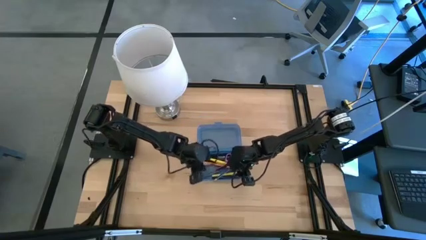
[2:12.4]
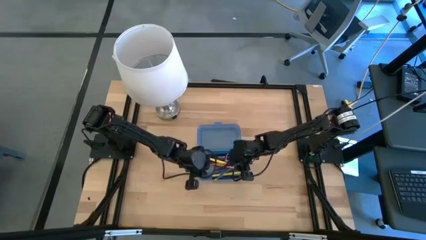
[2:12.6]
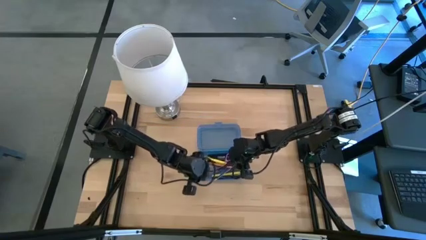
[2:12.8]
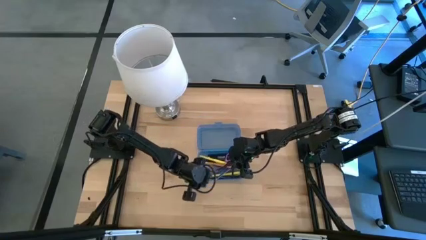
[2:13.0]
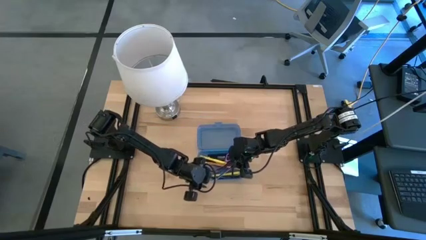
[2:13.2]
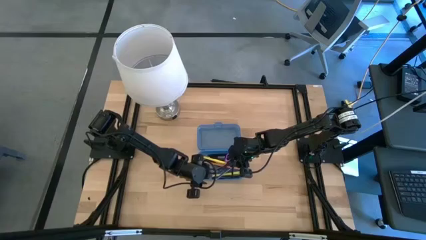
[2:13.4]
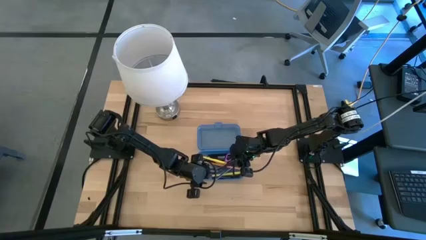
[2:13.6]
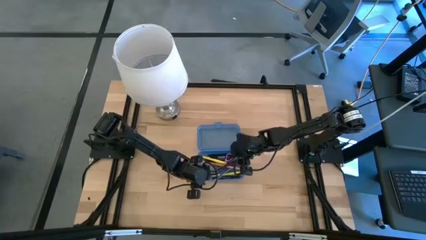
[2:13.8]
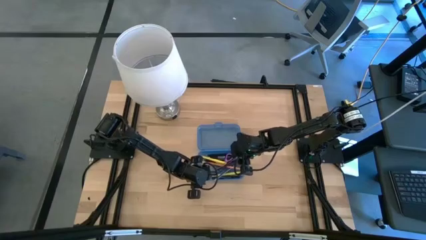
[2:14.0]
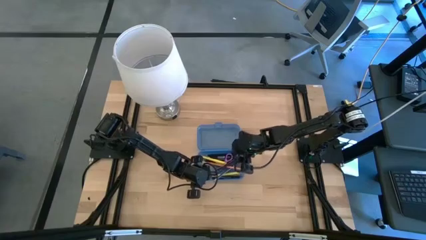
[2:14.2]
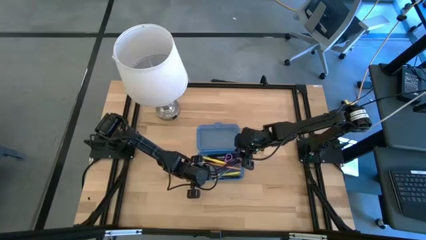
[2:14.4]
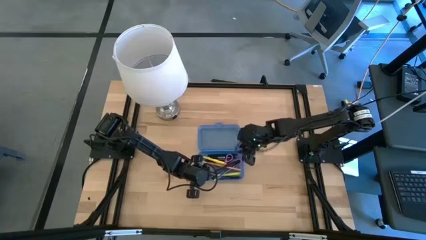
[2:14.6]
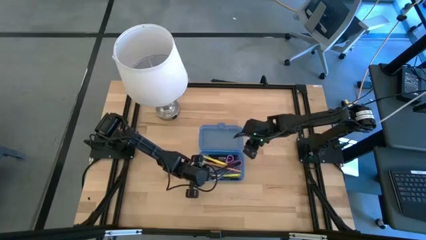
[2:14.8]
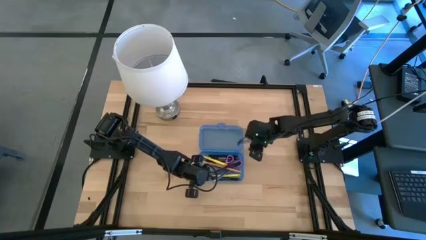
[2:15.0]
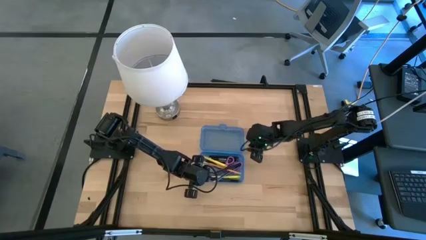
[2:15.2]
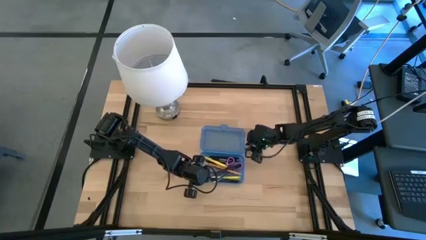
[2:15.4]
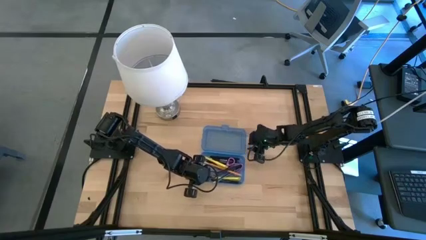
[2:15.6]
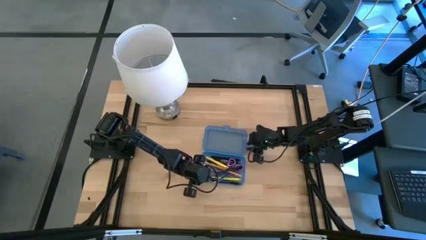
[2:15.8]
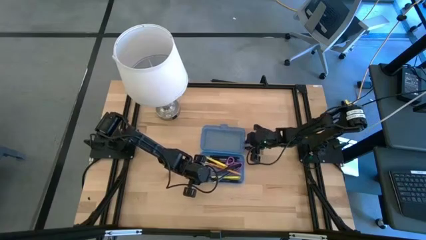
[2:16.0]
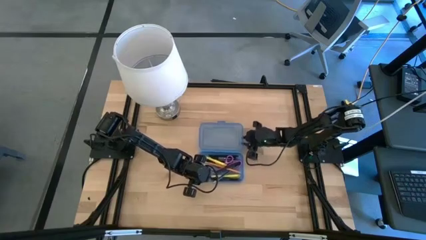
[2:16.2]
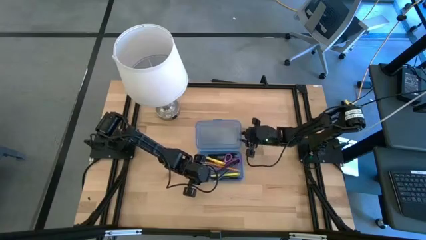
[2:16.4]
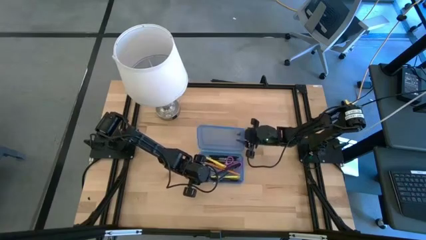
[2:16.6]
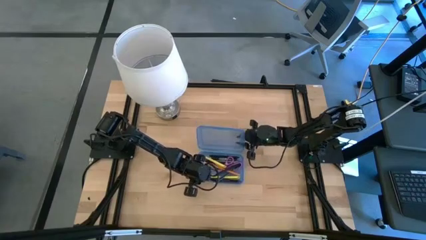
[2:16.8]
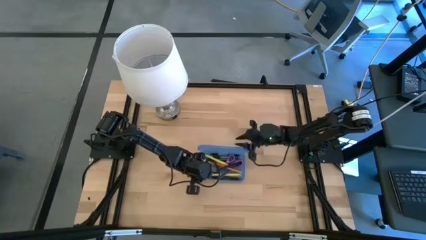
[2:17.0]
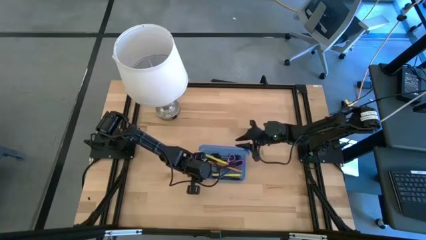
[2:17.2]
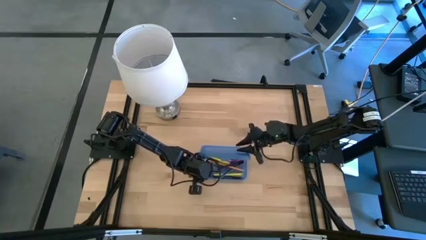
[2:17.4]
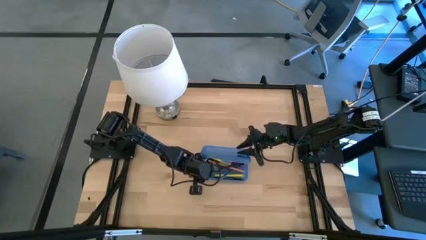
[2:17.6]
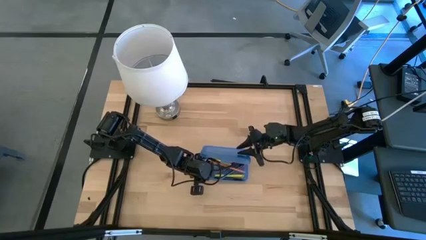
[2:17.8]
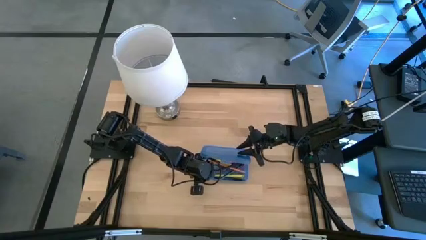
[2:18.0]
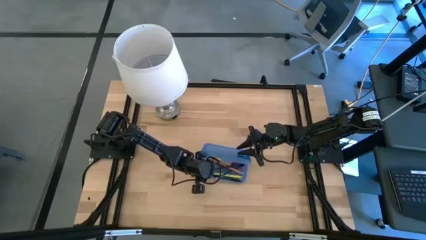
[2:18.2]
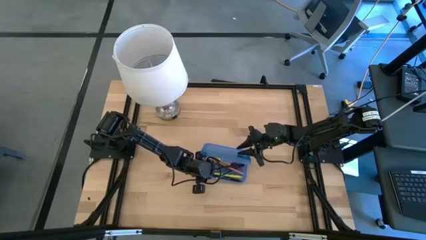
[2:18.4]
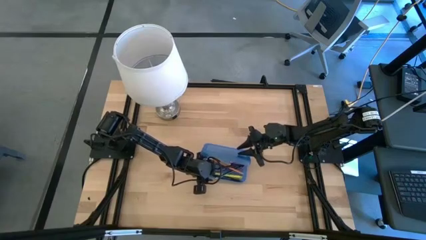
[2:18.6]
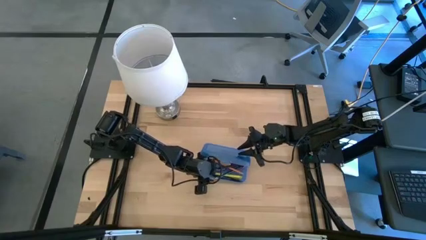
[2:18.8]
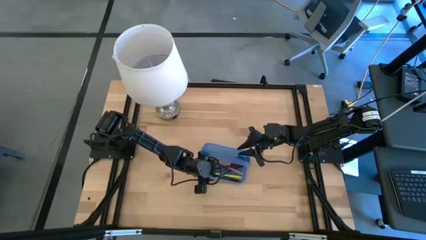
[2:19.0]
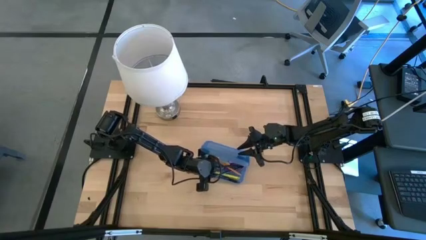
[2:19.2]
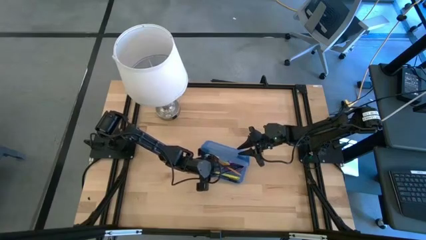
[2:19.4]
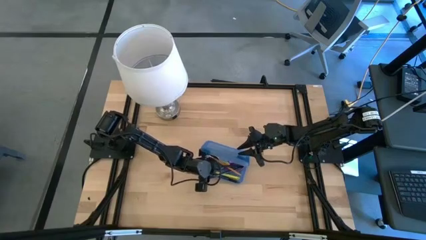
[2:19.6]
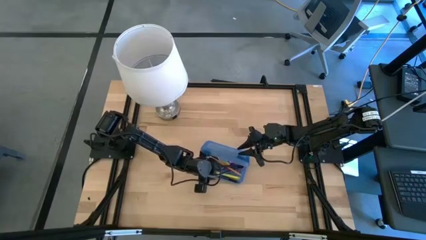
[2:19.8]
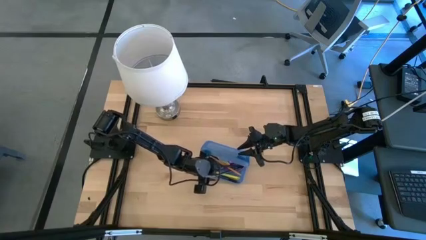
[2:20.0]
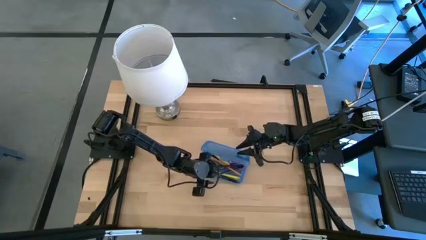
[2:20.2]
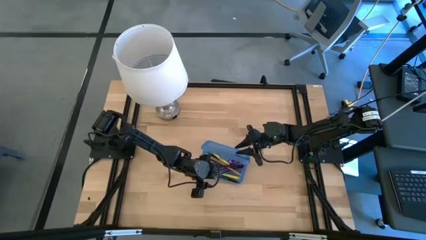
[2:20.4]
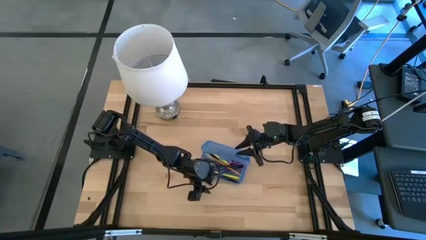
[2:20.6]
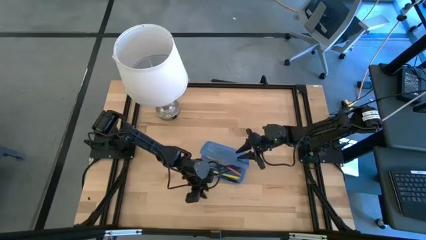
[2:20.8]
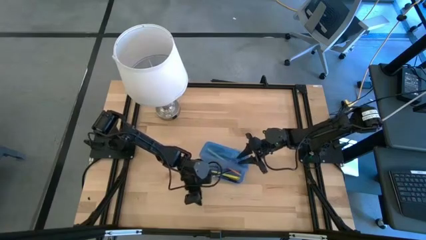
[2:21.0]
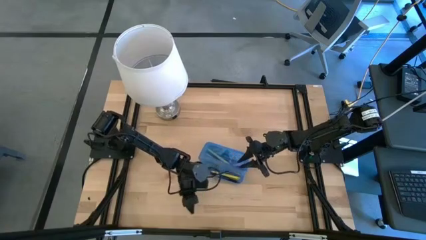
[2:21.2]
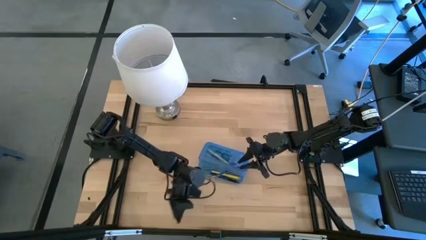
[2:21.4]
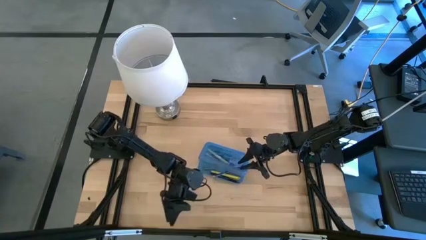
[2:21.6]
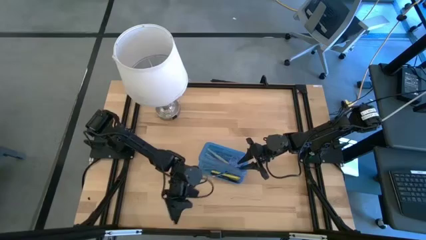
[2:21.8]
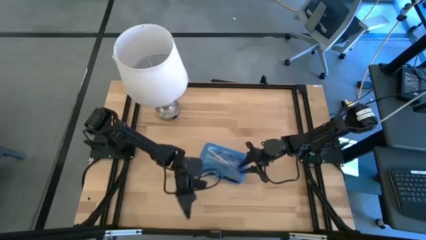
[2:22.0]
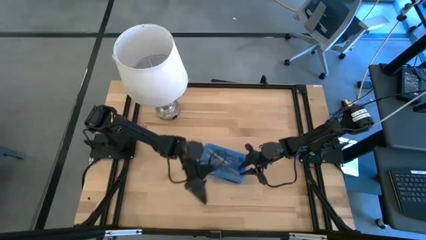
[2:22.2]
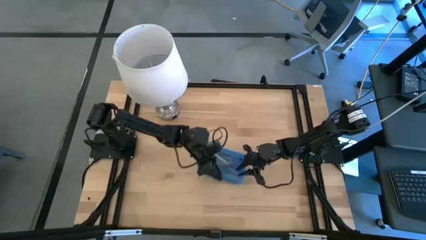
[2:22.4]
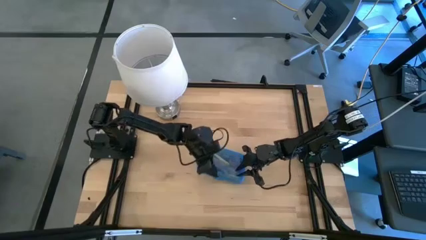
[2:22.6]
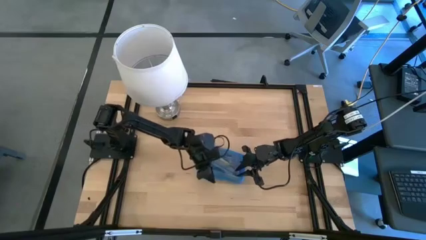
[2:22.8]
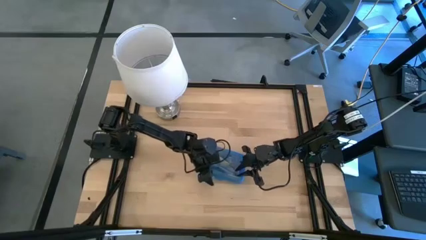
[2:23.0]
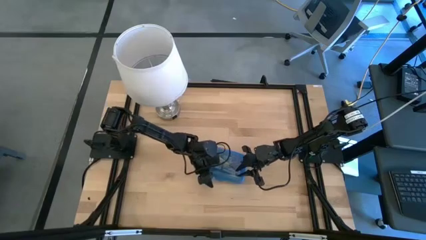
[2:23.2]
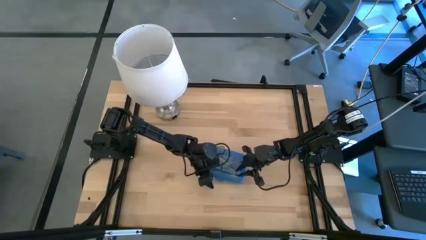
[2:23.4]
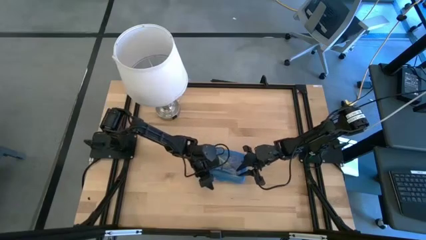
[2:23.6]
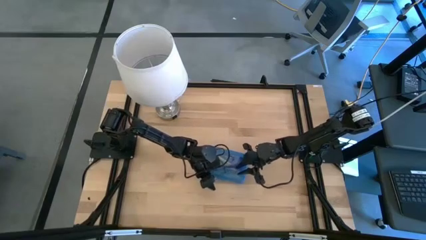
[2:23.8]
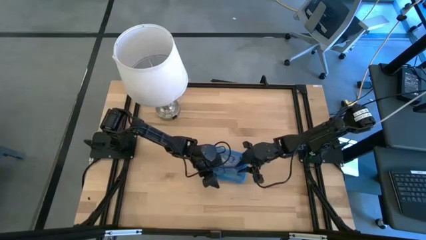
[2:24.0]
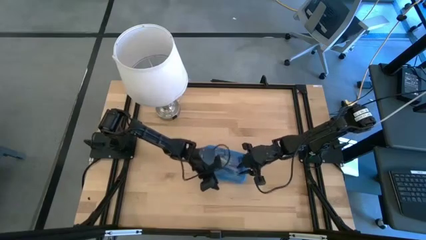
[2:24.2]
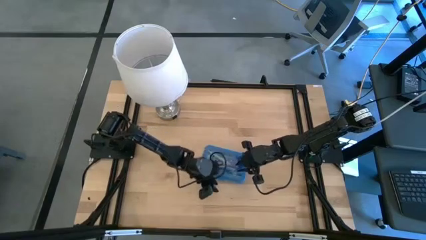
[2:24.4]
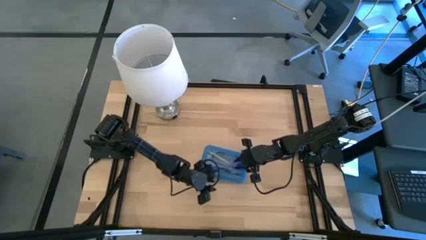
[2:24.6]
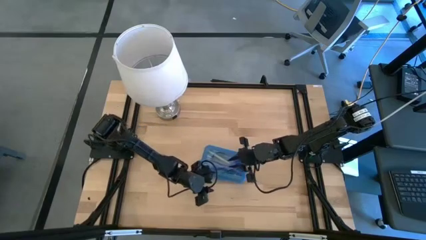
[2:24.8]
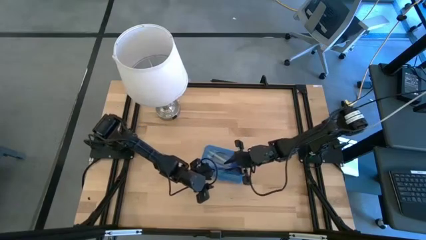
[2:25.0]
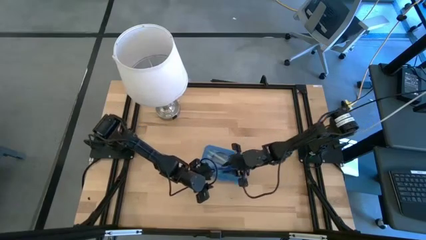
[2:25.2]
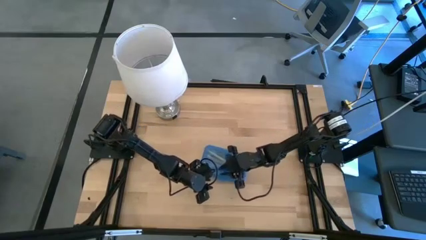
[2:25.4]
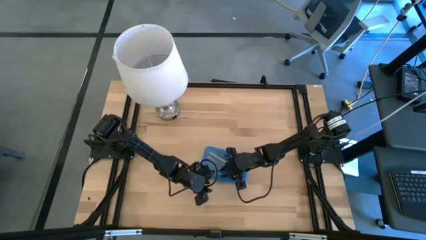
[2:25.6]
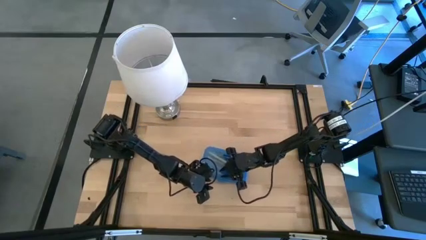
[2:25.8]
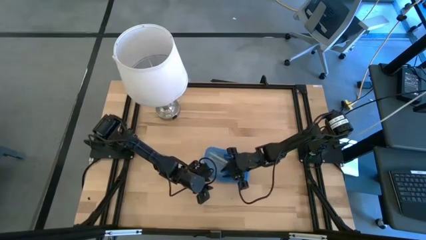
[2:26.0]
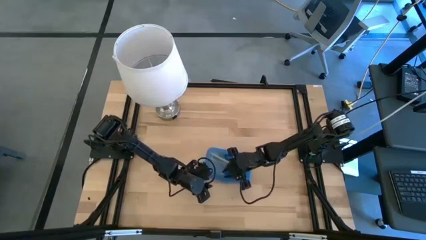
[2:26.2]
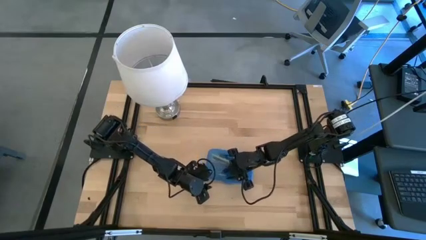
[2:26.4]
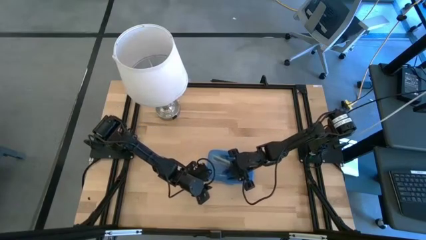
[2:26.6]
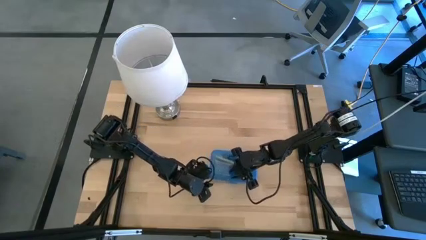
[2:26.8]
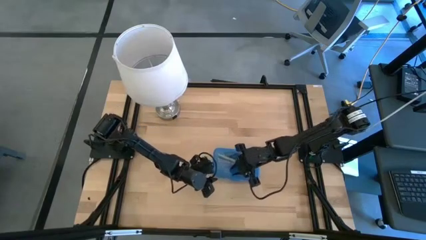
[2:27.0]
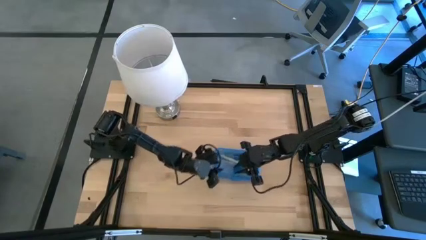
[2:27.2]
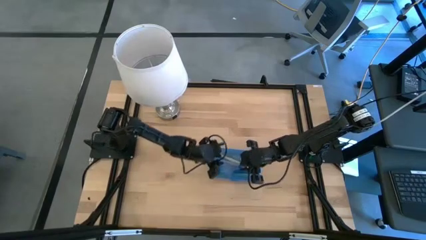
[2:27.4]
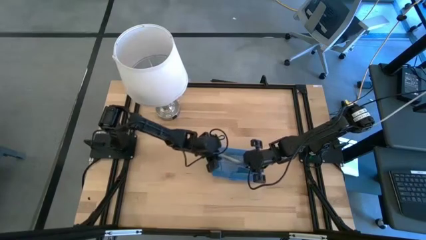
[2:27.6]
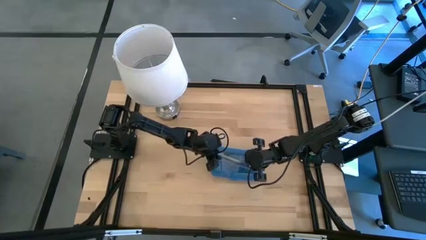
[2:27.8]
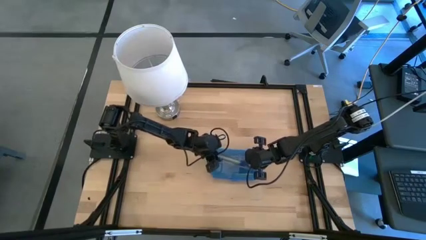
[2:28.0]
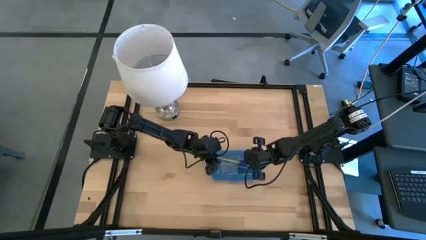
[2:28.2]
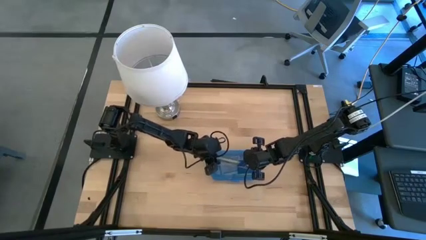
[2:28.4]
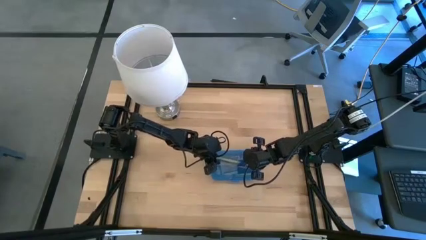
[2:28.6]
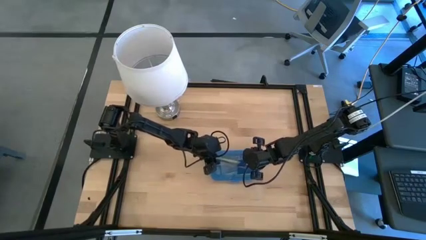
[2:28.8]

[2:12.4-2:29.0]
Task: Pick & place school supplies into a supply box
Close the blue supply box
